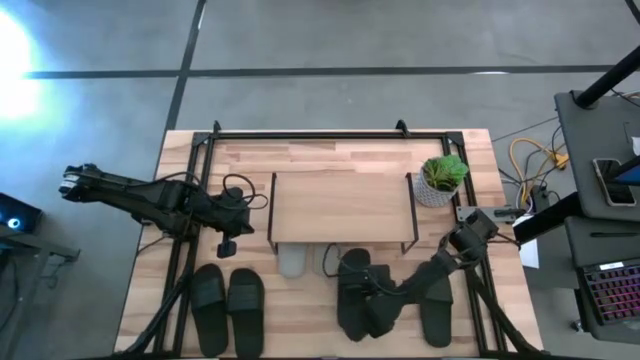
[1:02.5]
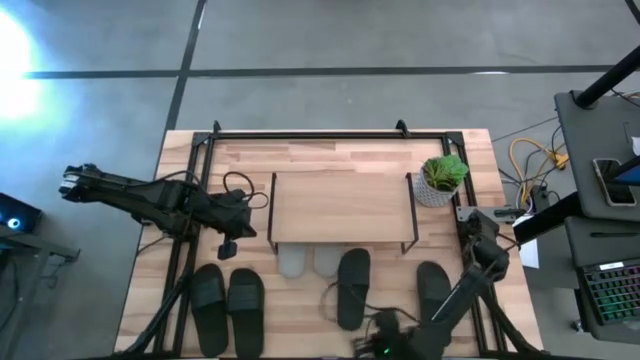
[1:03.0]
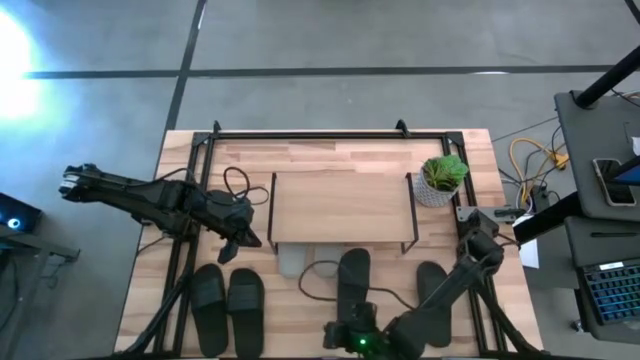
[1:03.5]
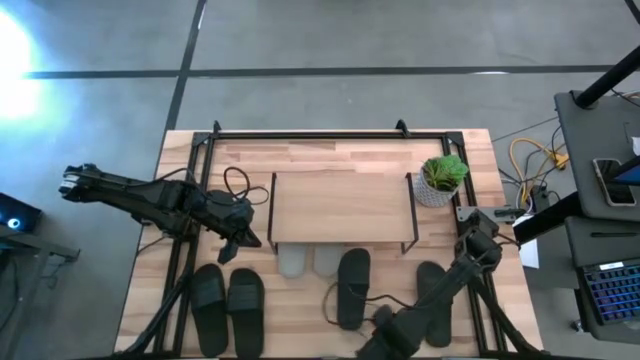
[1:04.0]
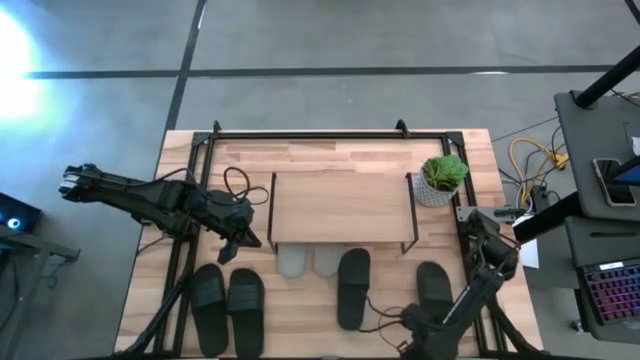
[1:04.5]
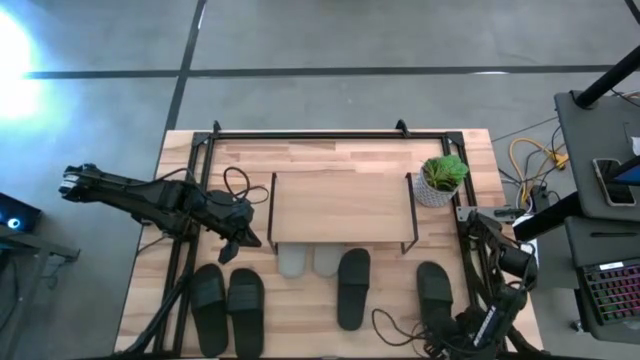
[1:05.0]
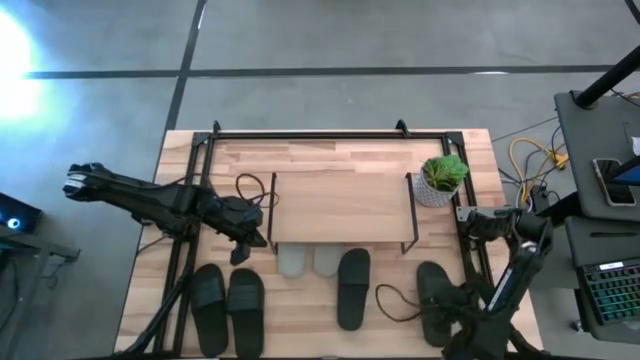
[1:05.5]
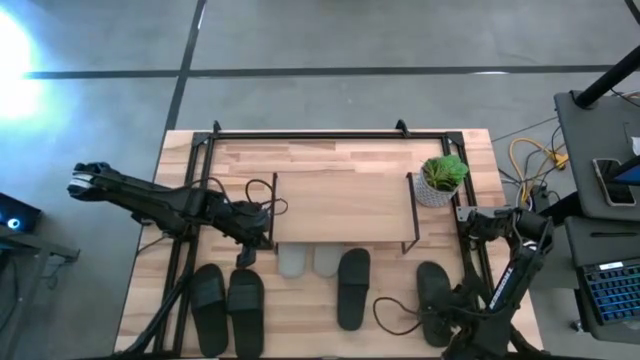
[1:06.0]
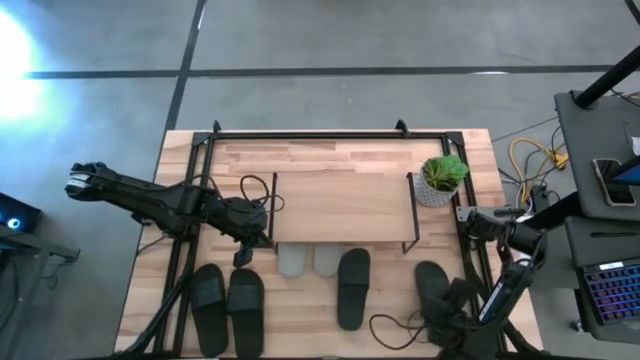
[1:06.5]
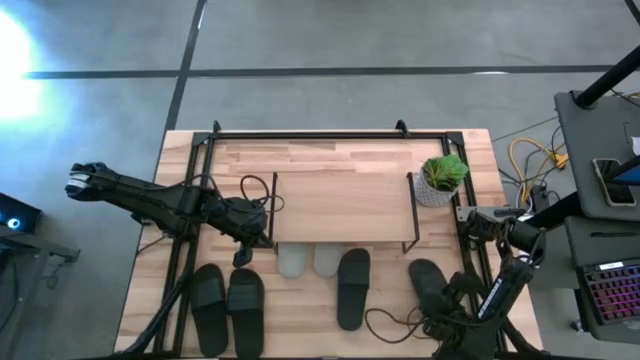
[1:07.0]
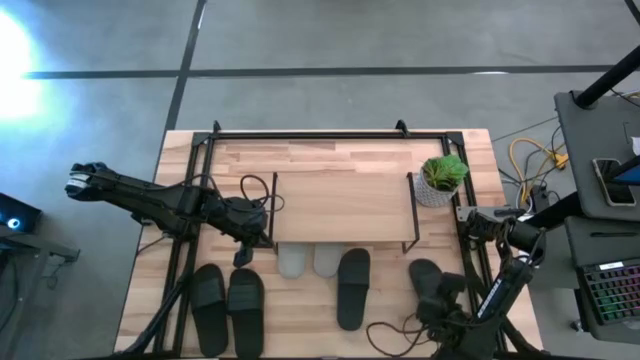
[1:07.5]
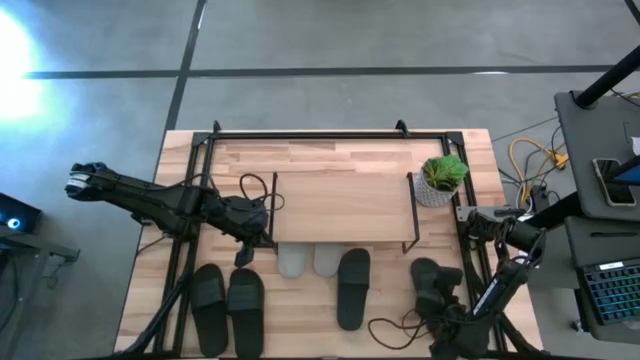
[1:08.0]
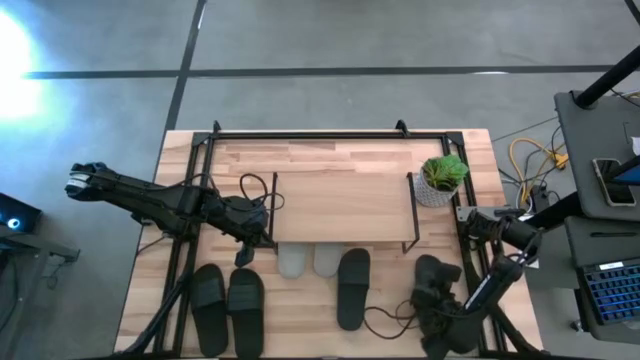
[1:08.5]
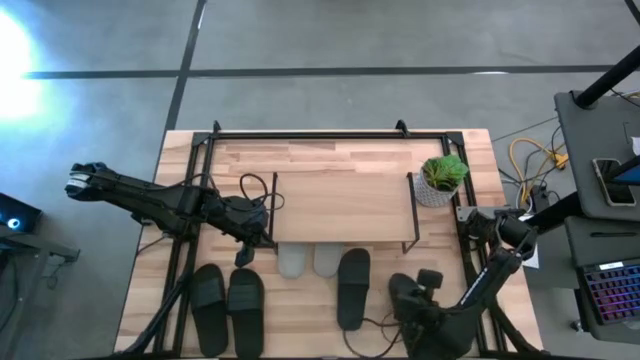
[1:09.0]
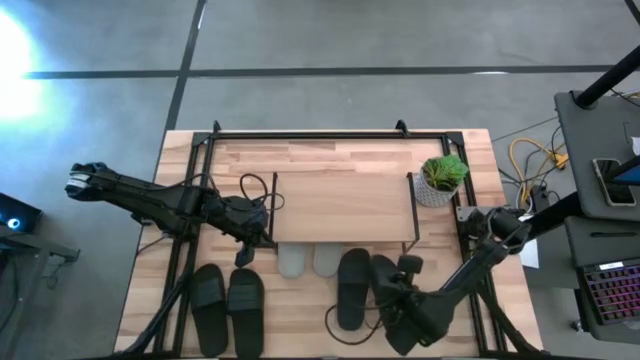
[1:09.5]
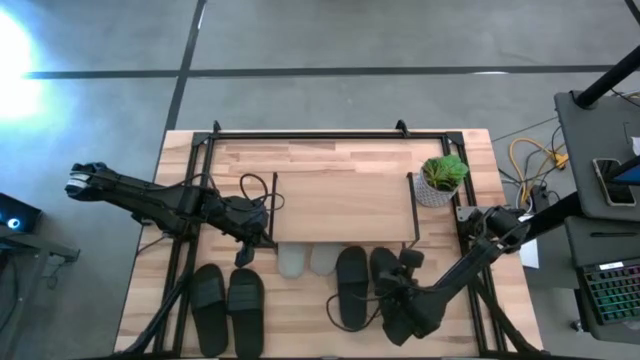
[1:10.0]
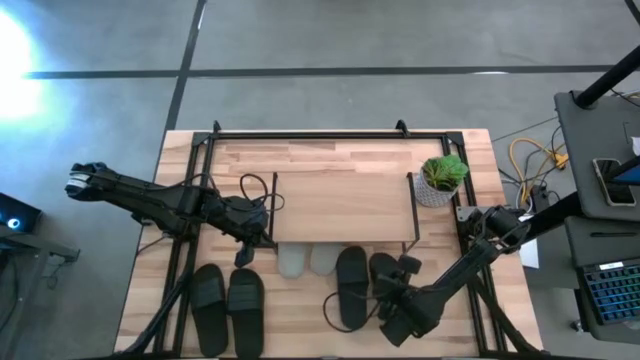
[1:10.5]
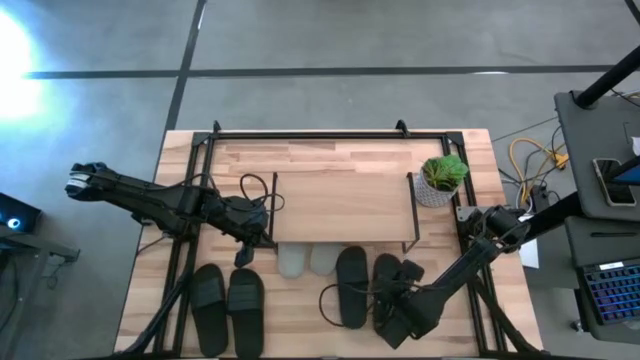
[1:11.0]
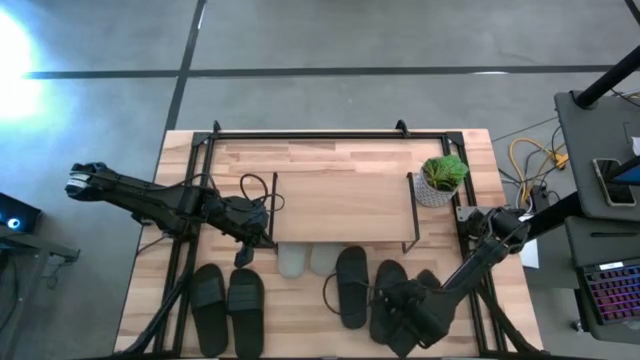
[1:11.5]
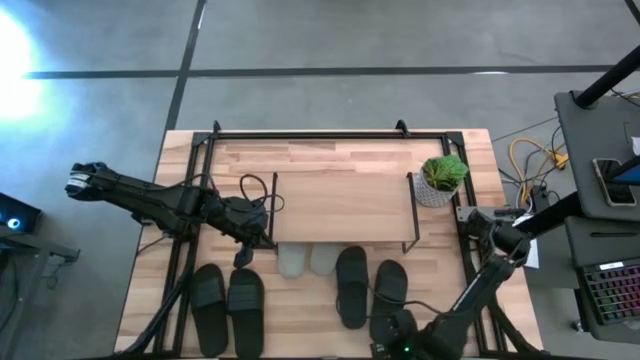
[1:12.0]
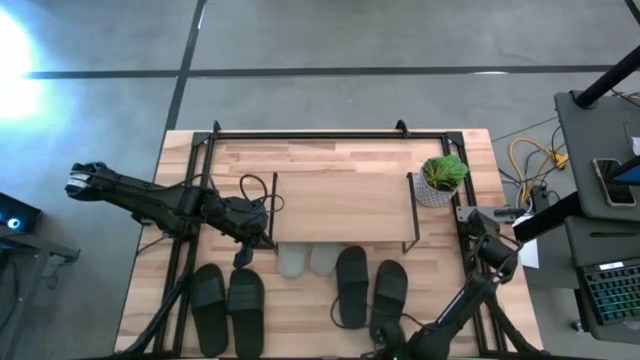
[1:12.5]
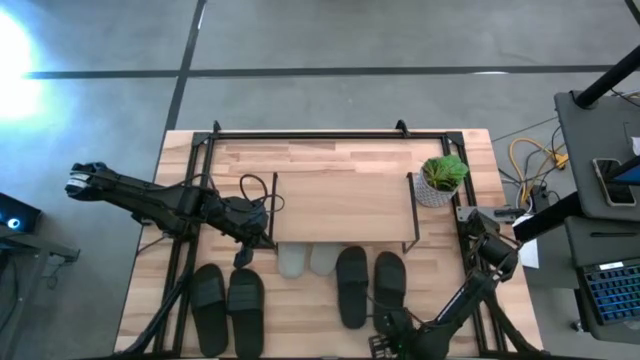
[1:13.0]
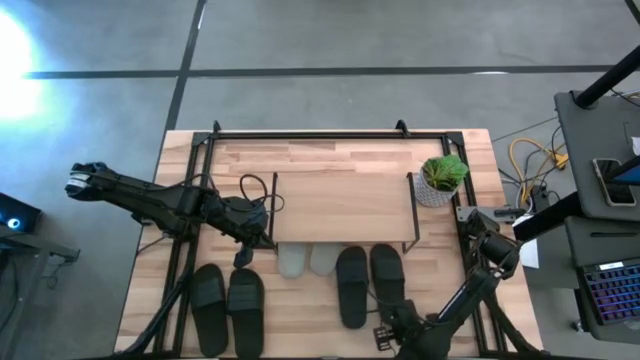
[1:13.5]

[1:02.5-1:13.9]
Task: Pick and place slides into the shelf
Move the right black slide beside the other black slide under the shelf

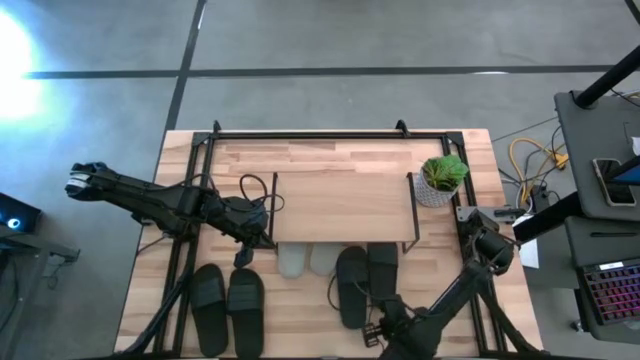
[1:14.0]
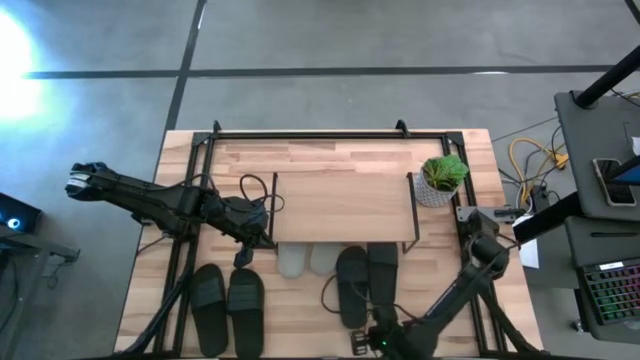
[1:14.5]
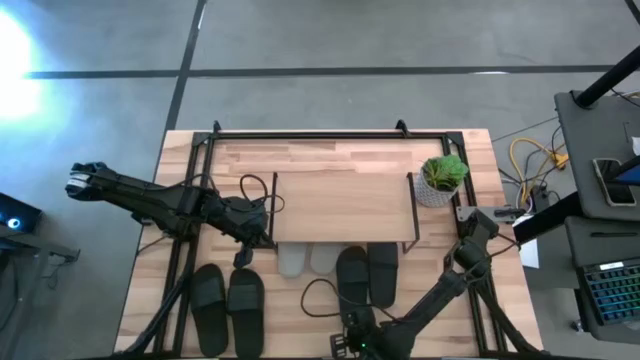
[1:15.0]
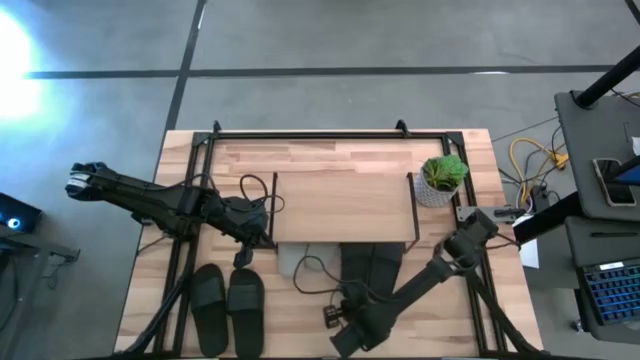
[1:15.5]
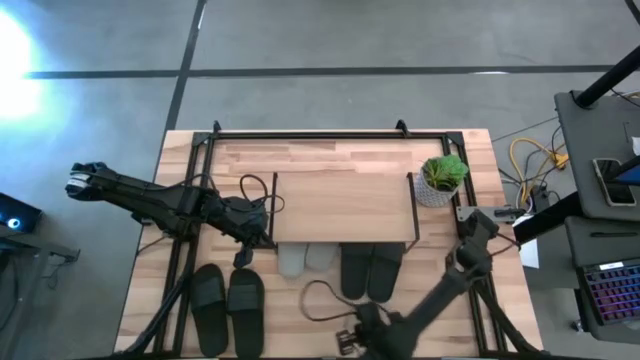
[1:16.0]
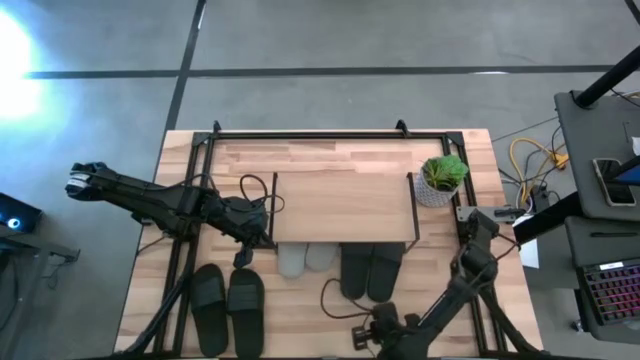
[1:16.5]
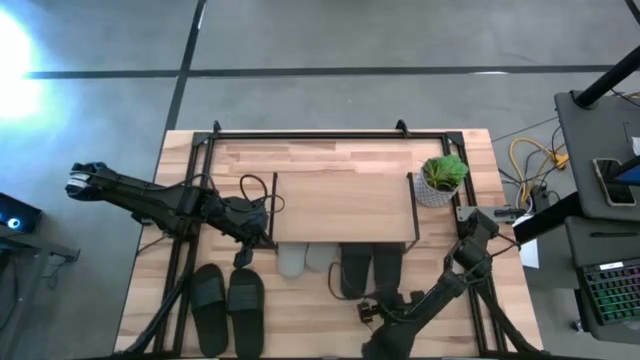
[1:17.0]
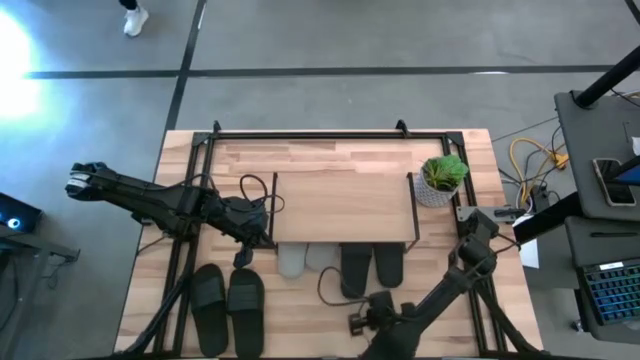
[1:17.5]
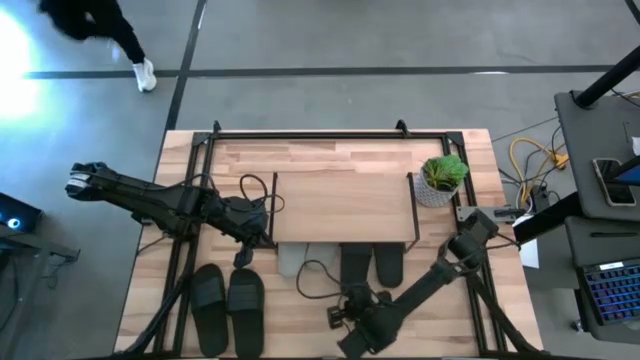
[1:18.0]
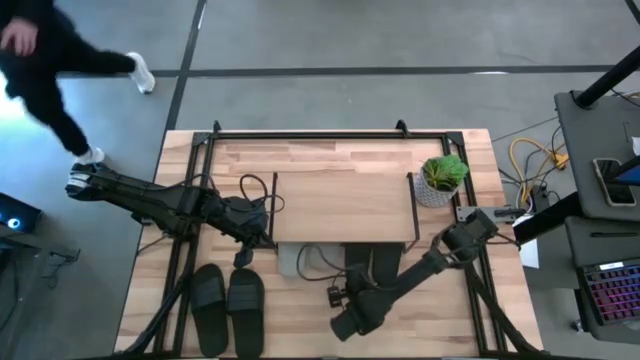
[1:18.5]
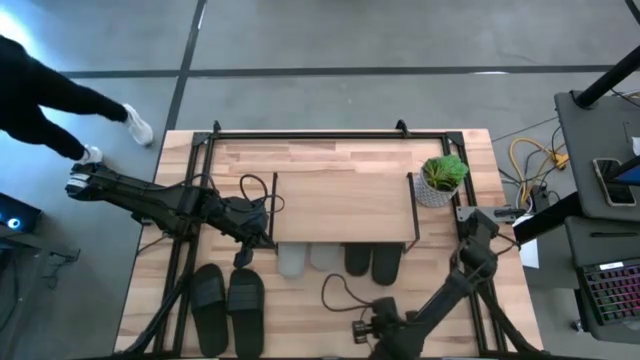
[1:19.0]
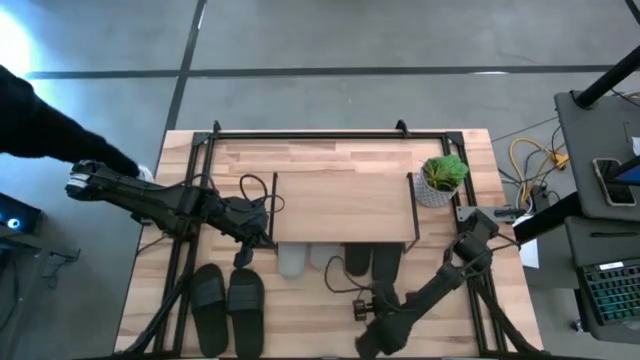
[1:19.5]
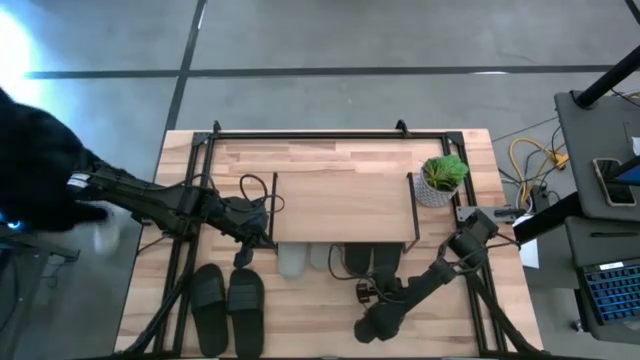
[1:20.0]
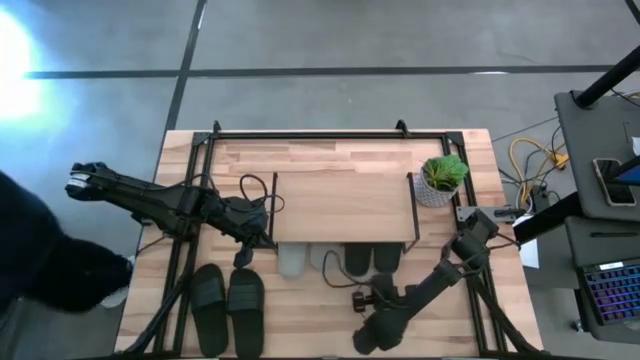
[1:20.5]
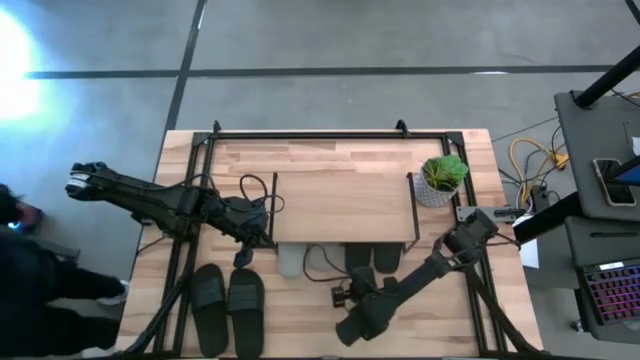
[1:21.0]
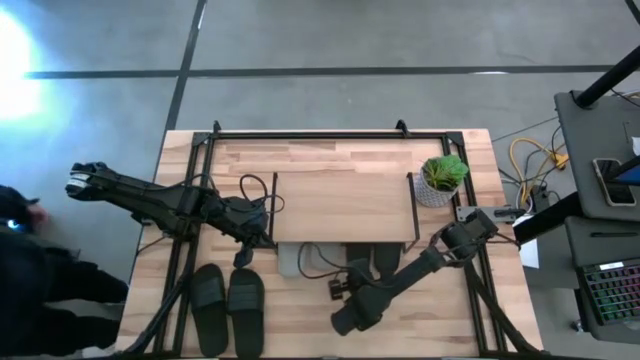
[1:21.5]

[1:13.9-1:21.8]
Move the black slides under the shelf

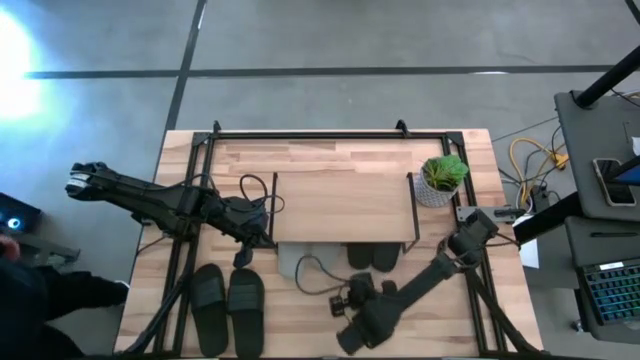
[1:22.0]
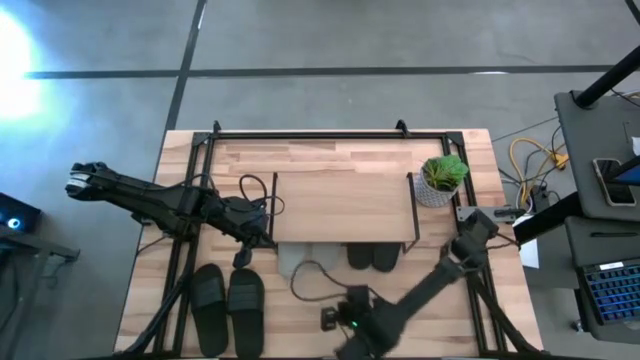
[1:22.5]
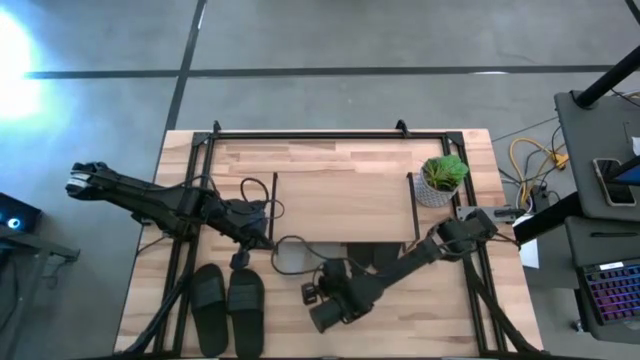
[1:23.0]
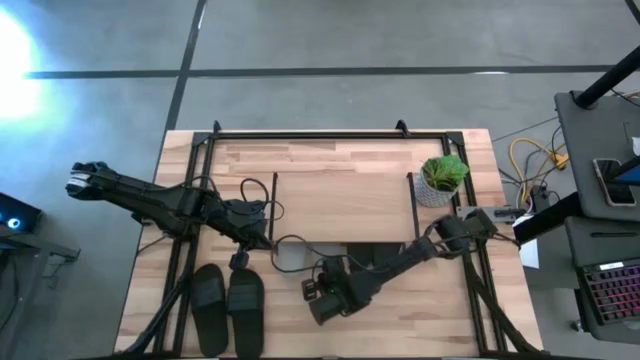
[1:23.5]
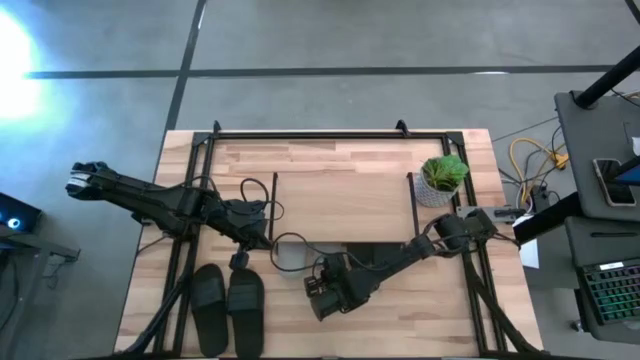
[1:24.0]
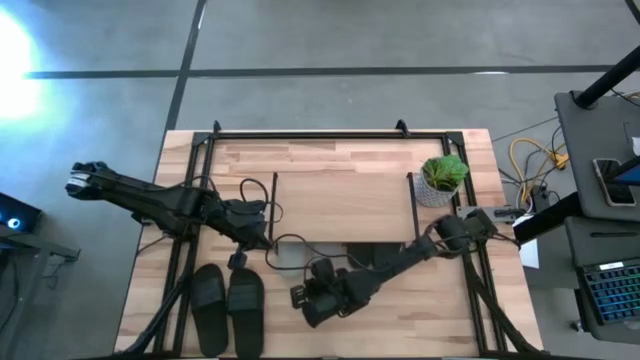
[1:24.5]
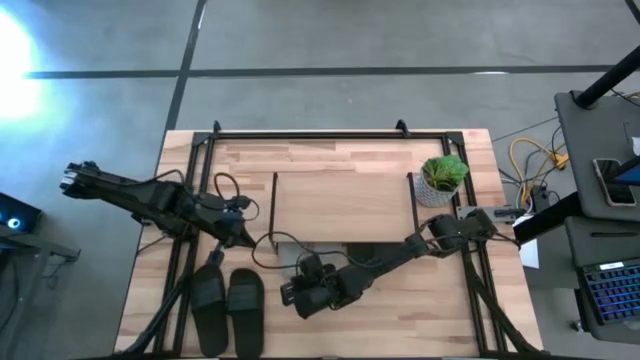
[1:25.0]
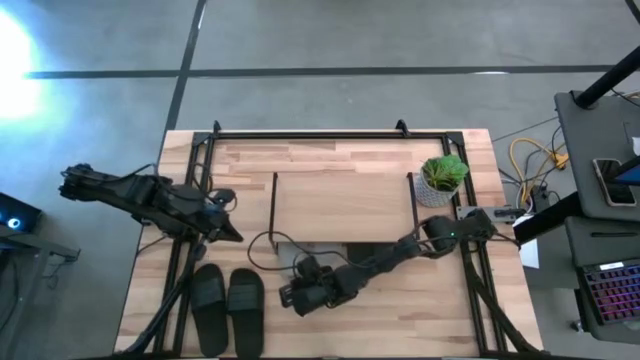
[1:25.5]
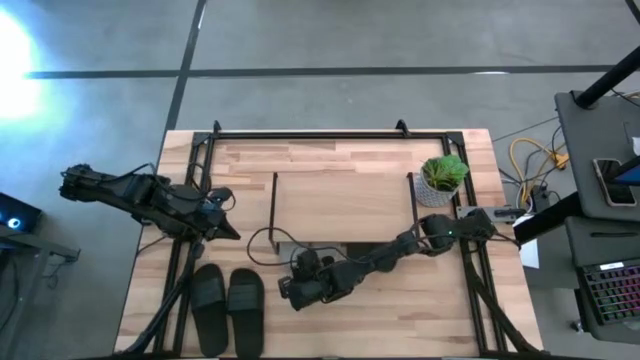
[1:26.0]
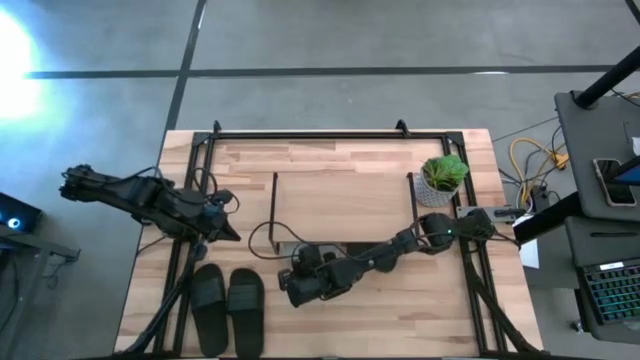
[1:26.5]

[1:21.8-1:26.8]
Adjust the gray slides under the shelf
